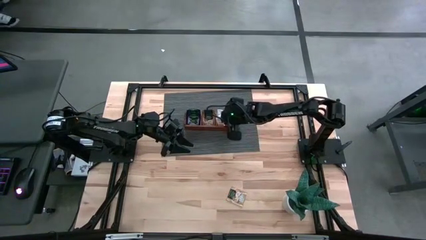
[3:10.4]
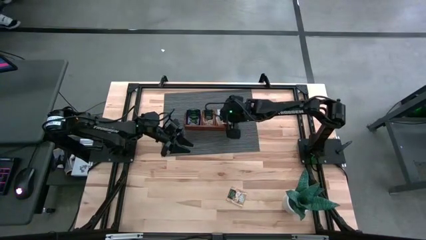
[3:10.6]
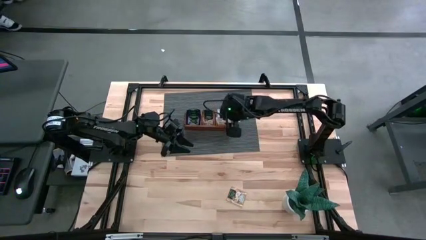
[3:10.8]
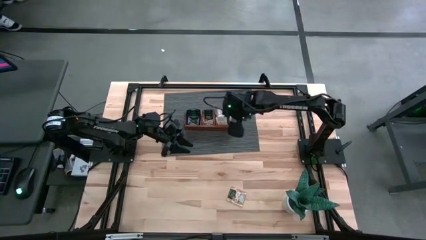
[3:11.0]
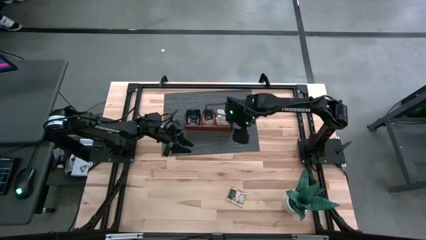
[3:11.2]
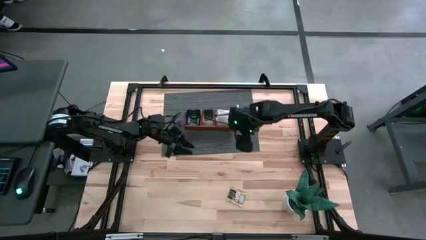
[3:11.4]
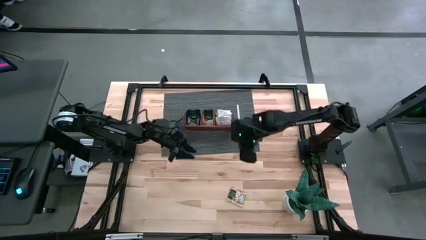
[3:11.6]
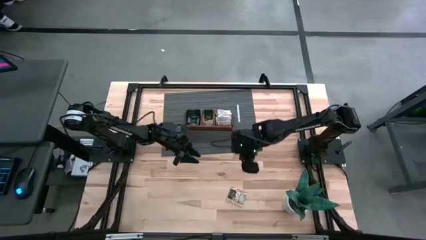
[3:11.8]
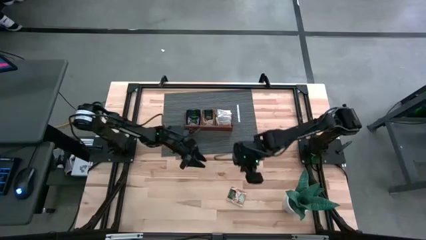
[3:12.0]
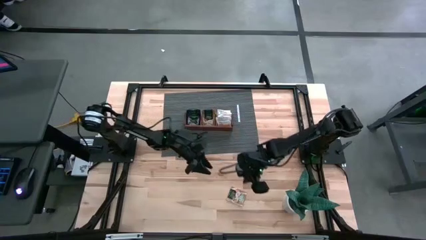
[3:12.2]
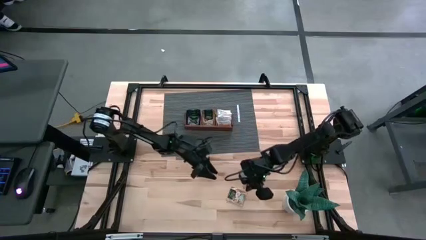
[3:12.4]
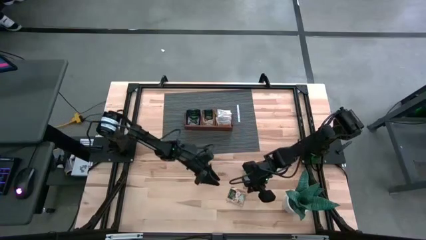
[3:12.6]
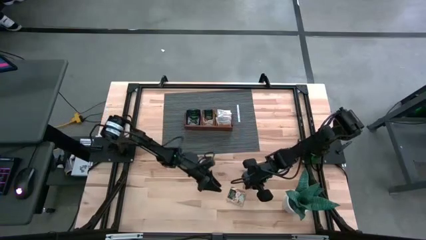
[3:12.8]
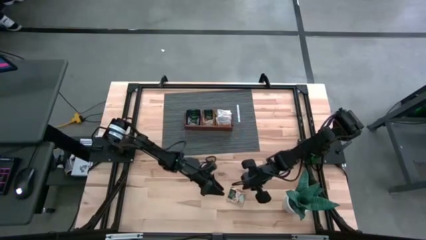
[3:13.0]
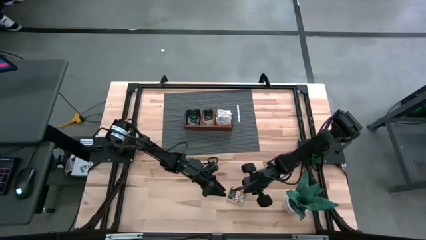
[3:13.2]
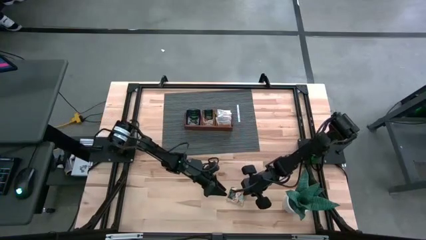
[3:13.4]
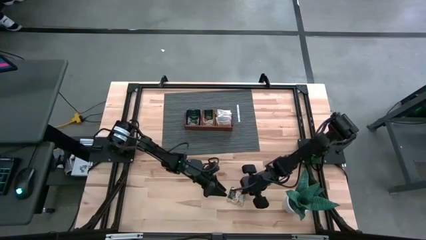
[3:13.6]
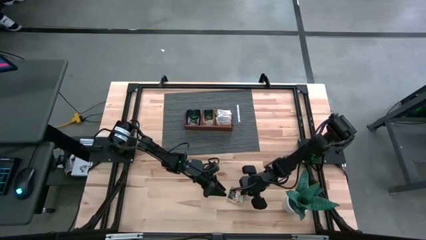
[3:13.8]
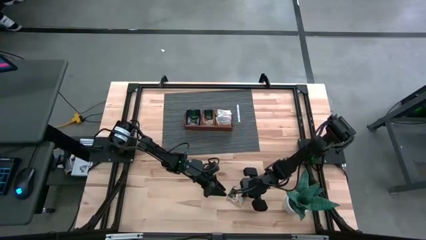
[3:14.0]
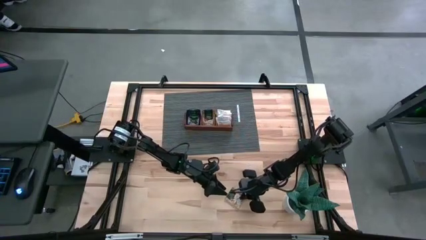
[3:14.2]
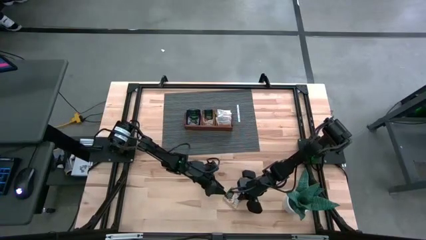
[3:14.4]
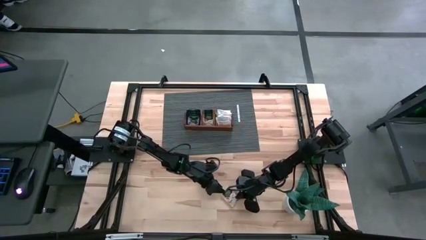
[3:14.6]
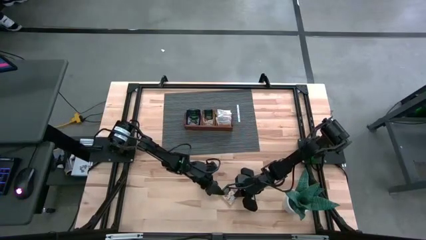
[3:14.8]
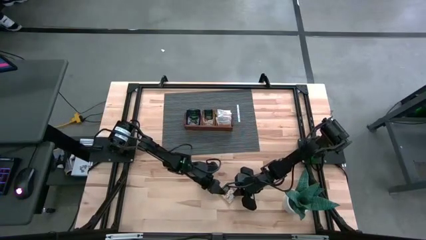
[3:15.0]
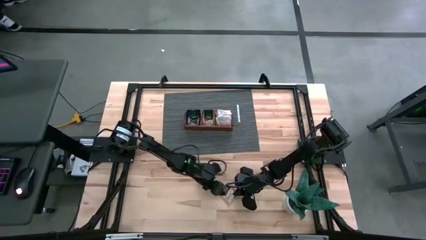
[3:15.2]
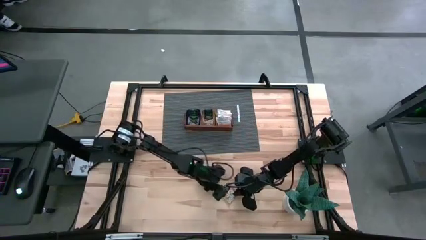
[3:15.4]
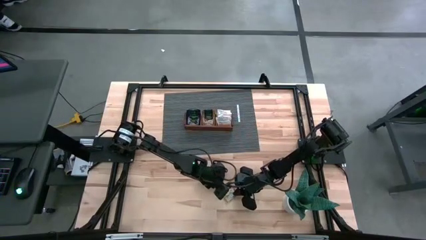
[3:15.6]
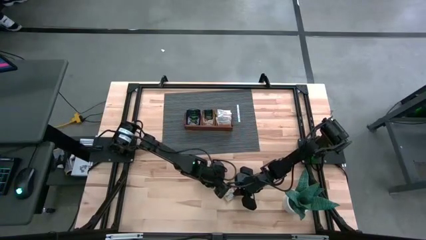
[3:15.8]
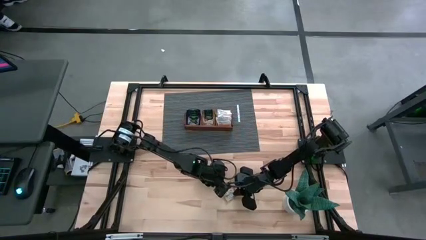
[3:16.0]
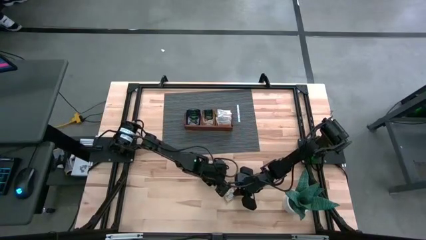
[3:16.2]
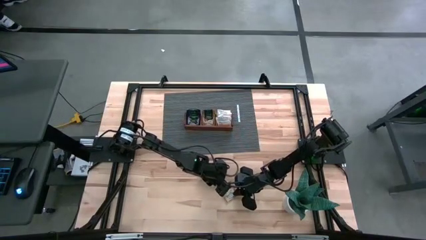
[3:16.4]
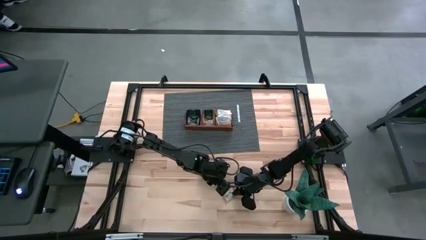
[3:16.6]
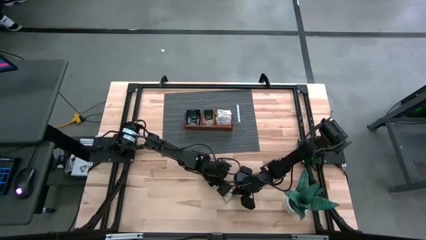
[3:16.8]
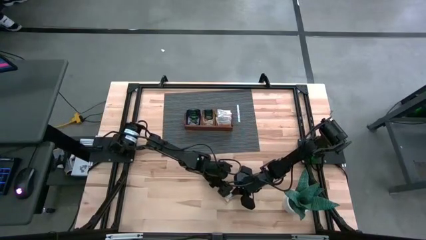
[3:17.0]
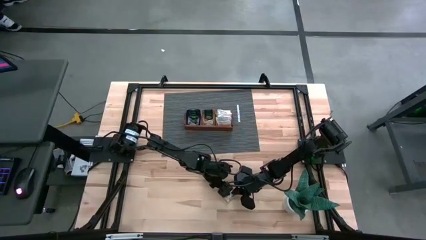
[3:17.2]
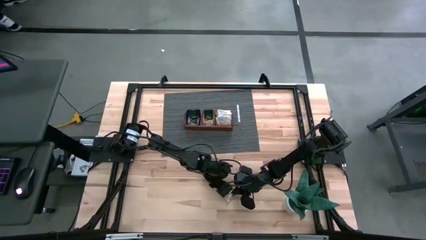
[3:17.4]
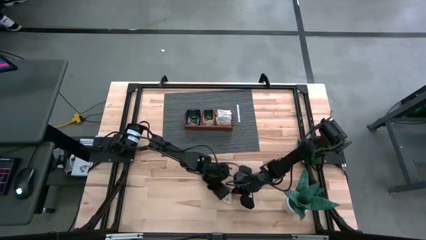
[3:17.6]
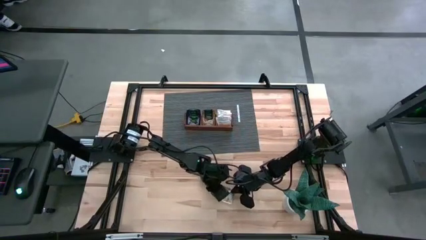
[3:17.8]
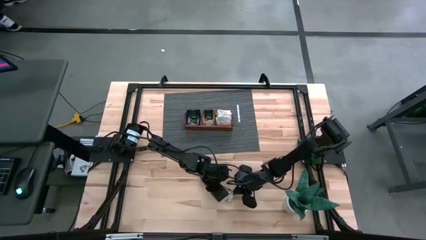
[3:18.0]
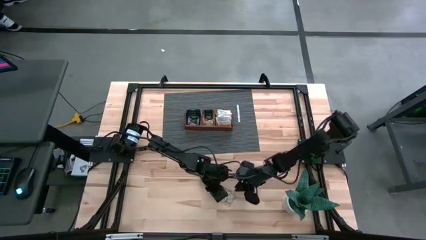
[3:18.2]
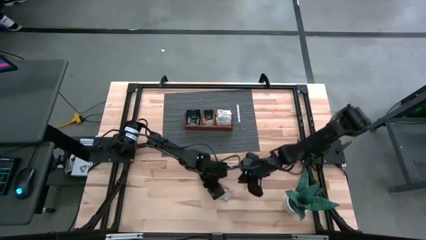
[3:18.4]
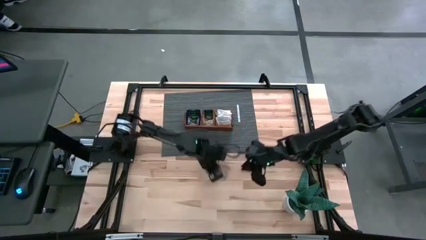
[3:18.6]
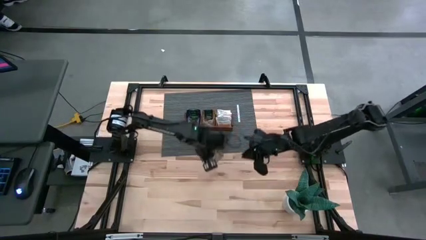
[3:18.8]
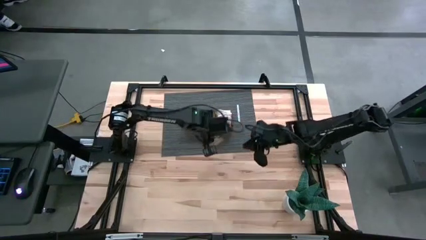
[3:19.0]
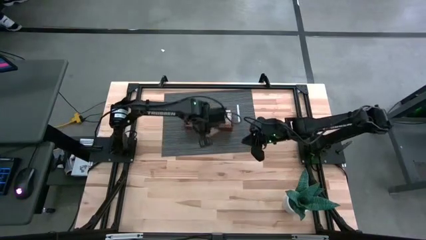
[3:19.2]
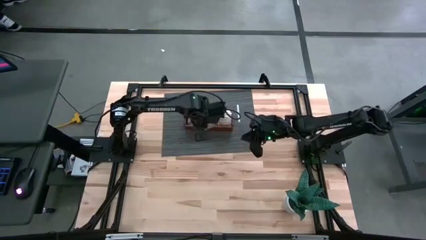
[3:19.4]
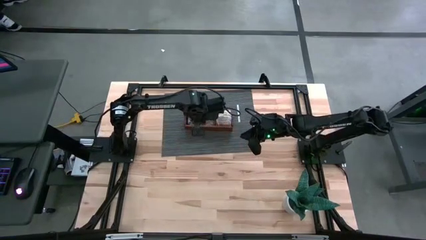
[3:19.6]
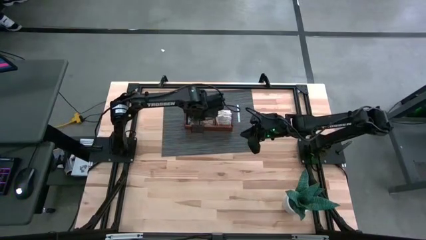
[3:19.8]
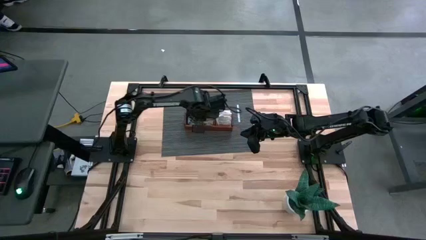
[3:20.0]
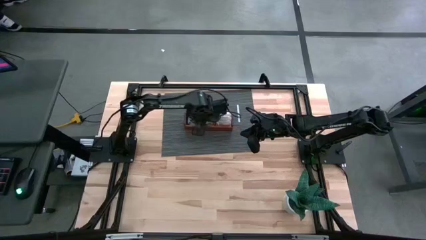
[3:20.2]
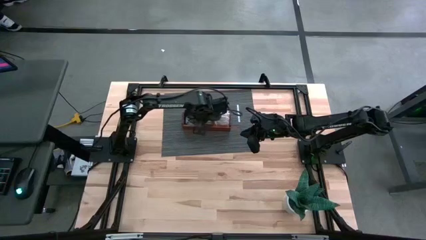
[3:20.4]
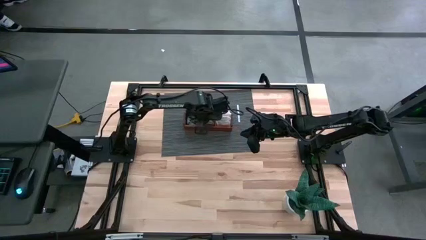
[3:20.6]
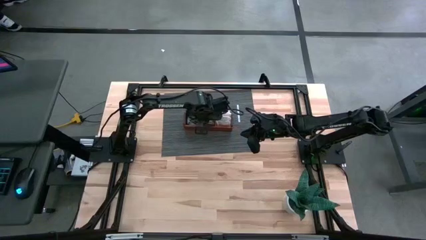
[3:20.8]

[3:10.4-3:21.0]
Task: Pick & Place Tea
Put the brown tea bag into the middle section of the wooden organizer

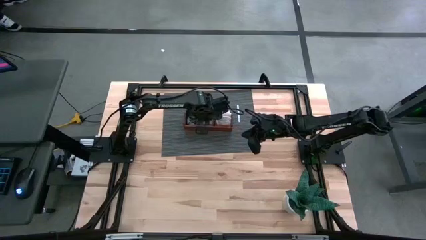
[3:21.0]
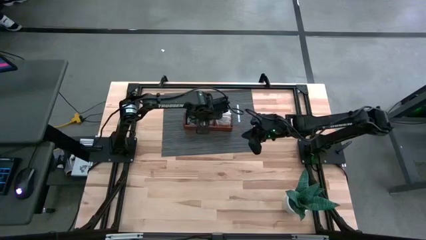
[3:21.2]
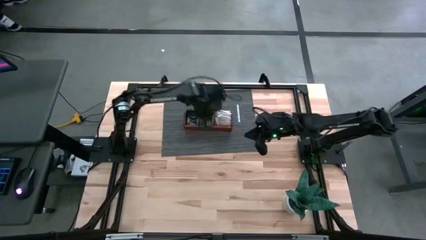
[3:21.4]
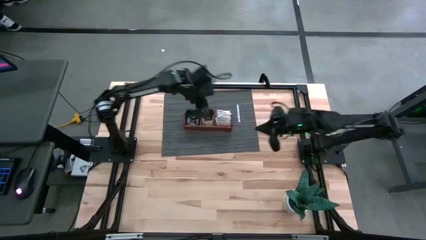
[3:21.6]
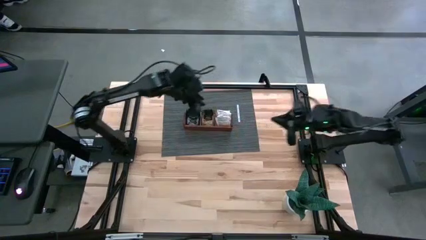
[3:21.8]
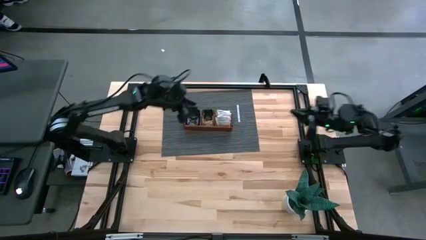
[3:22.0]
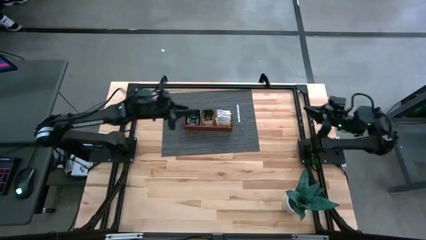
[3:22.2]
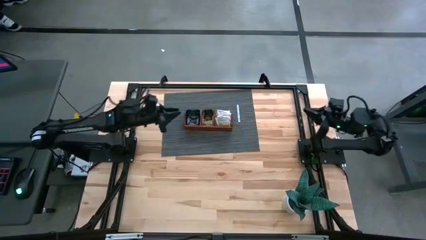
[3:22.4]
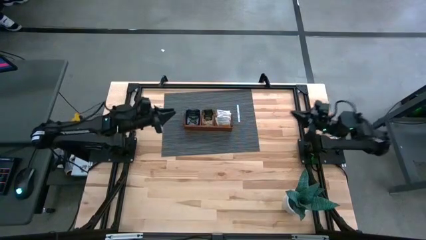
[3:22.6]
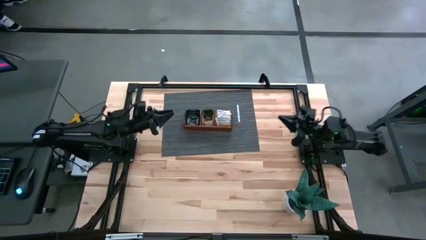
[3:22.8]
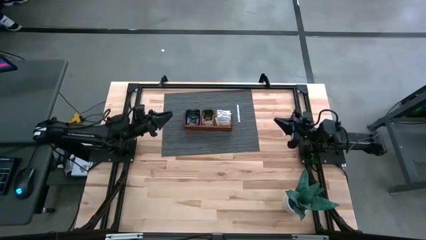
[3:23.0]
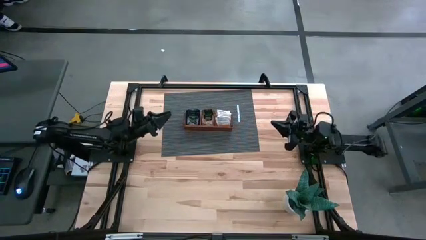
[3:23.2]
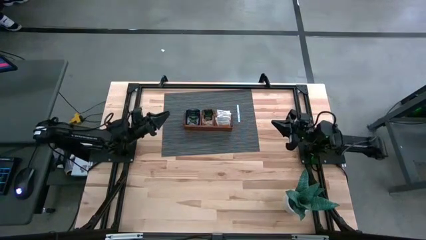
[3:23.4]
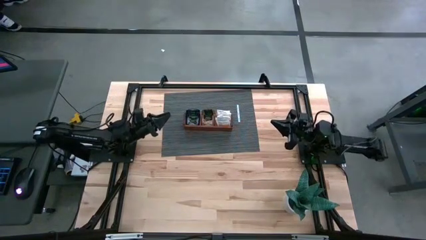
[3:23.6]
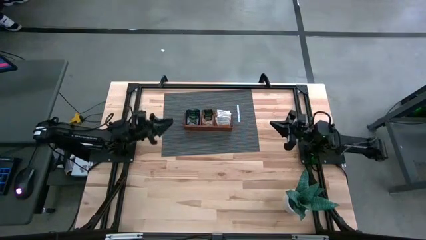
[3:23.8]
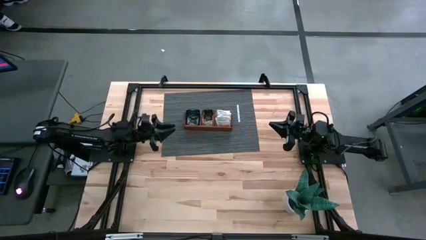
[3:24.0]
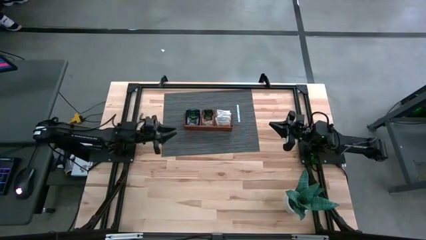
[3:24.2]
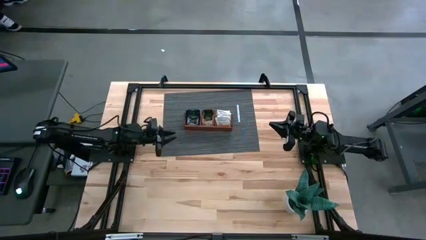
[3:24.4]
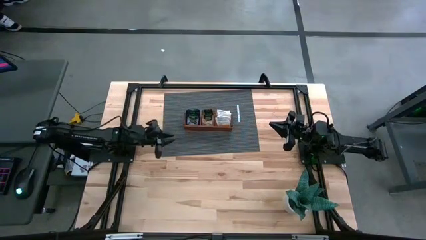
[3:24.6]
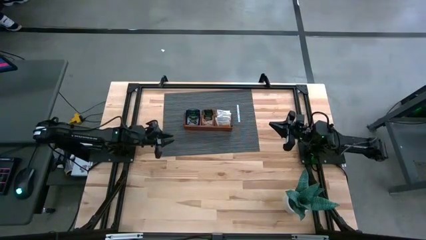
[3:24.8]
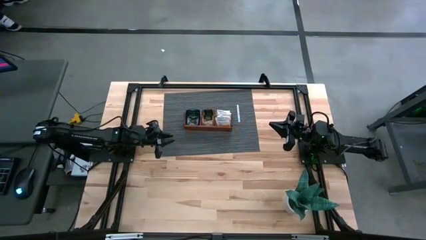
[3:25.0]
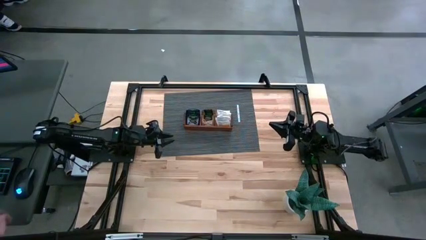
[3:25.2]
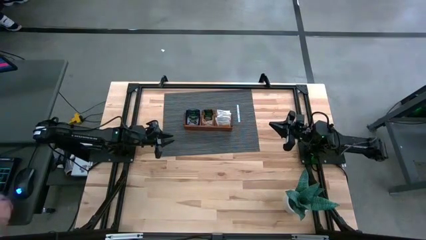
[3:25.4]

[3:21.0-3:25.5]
Return to Home Position

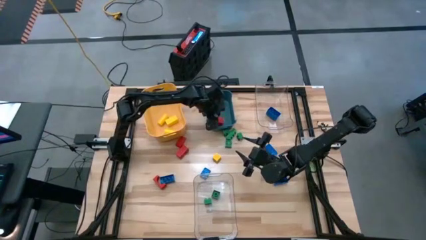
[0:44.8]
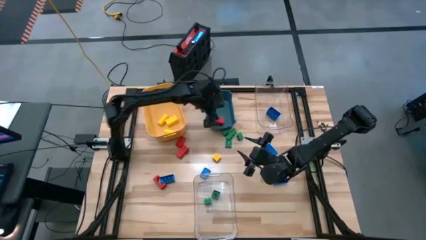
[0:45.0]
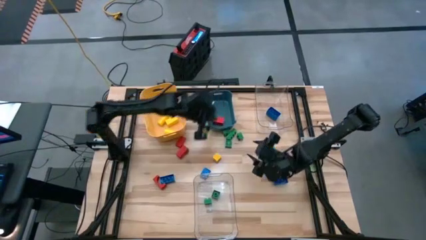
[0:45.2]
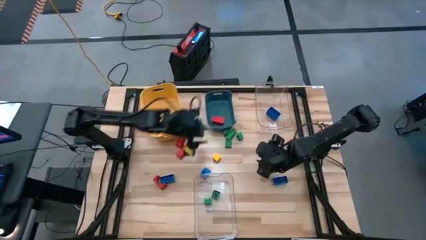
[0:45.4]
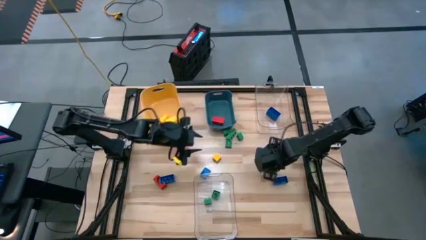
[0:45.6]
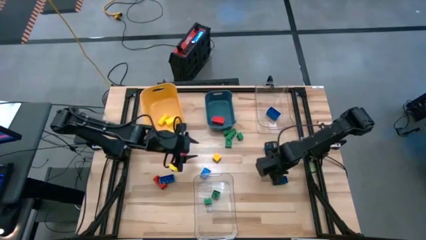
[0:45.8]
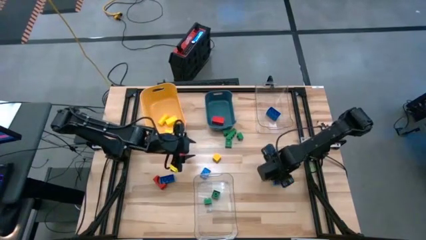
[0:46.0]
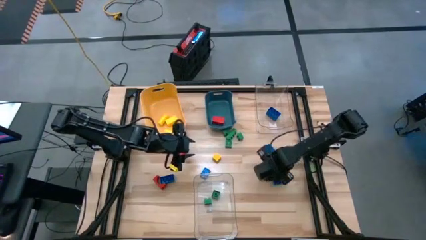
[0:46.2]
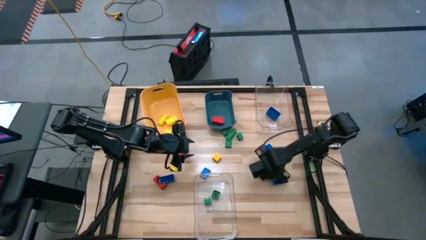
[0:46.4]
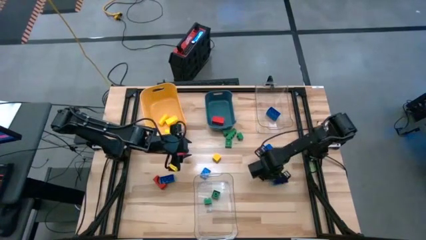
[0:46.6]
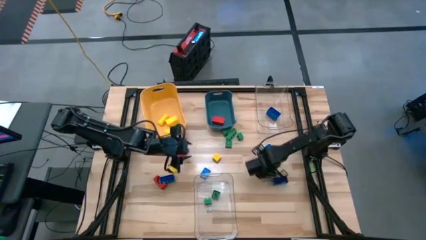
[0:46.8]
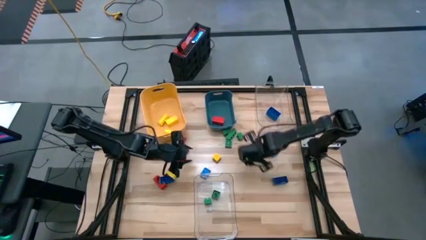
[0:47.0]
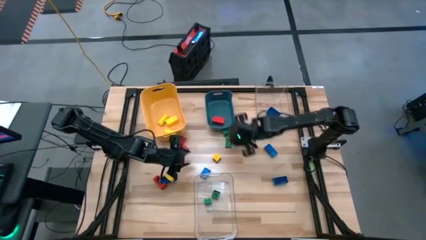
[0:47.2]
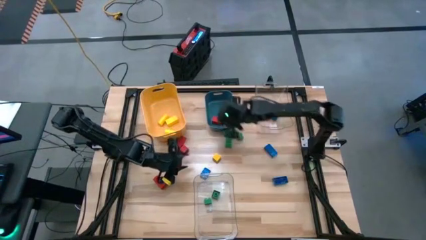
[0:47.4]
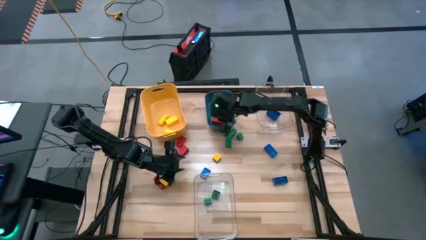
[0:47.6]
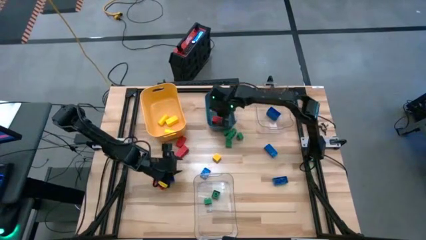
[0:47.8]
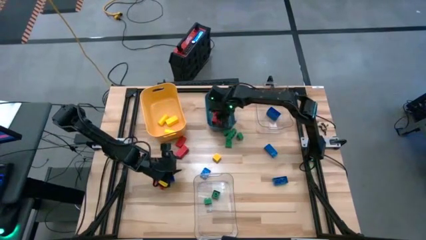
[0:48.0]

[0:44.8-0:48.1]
Task: Sort blocks
Put the red wooden block into the blue bin
